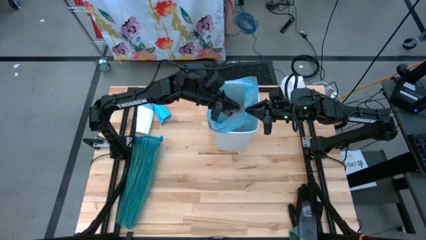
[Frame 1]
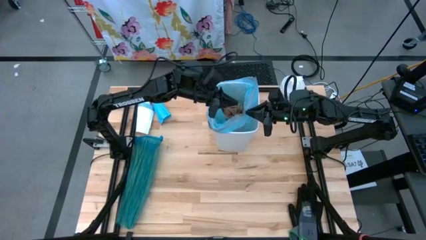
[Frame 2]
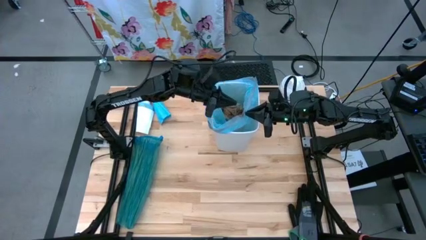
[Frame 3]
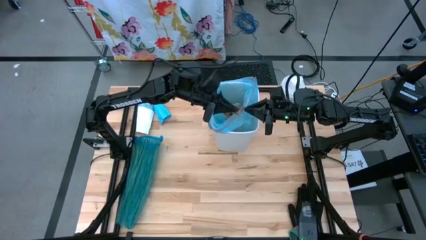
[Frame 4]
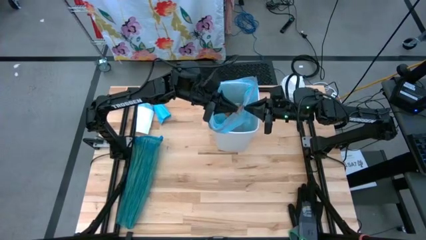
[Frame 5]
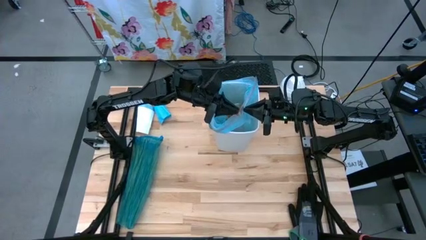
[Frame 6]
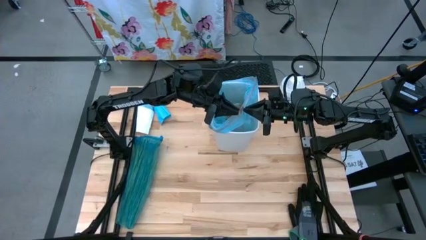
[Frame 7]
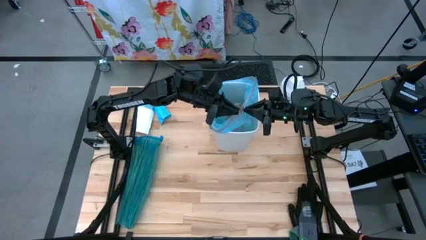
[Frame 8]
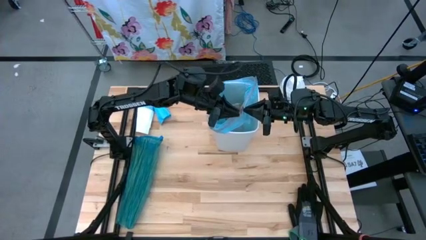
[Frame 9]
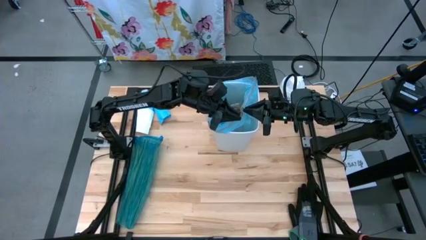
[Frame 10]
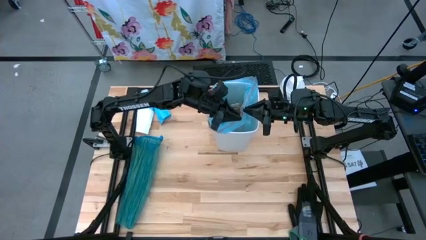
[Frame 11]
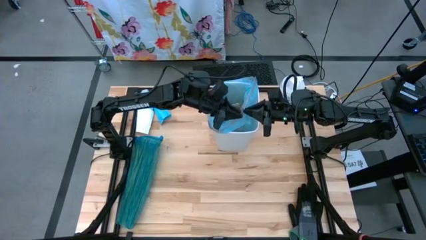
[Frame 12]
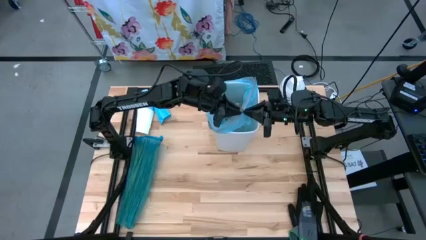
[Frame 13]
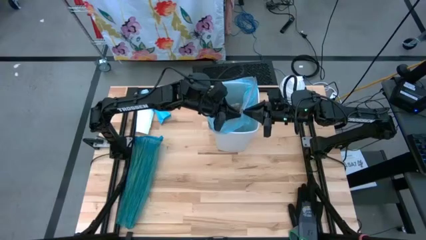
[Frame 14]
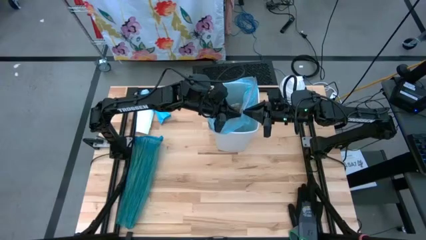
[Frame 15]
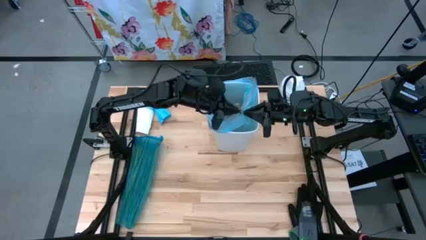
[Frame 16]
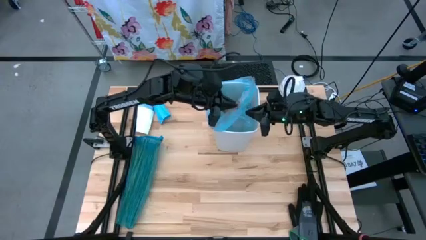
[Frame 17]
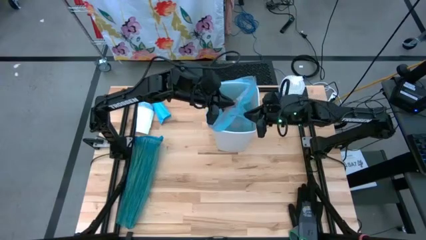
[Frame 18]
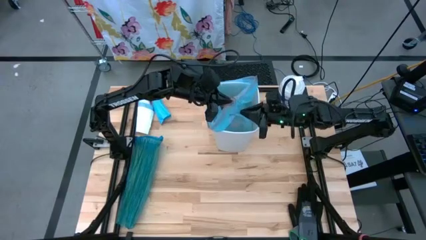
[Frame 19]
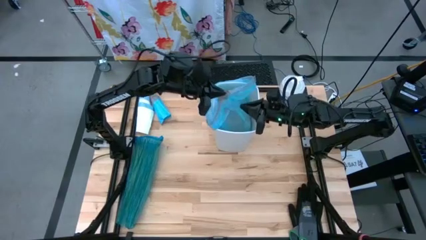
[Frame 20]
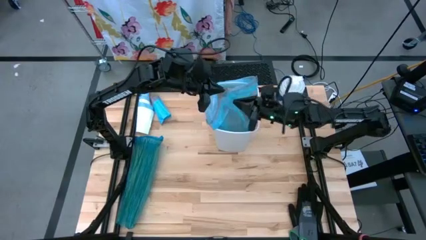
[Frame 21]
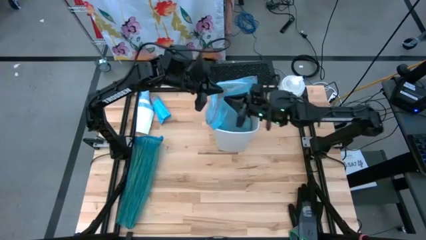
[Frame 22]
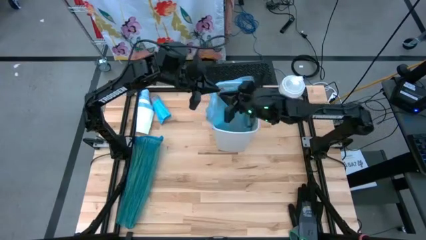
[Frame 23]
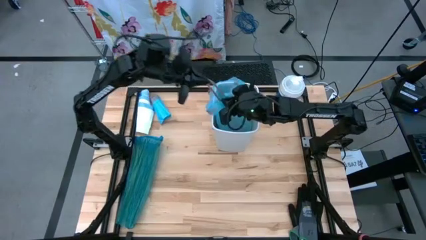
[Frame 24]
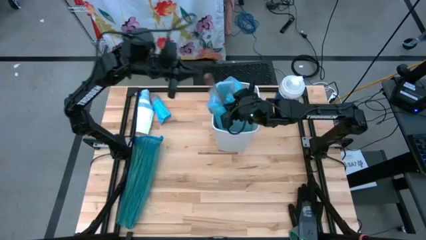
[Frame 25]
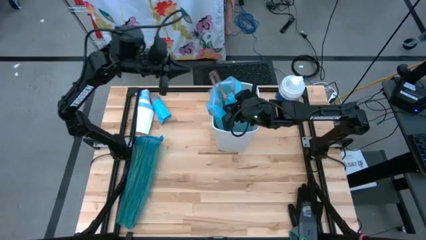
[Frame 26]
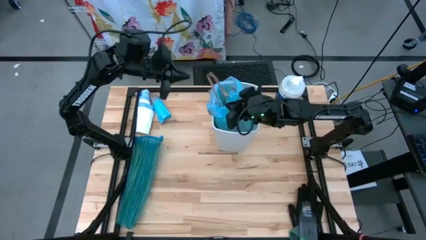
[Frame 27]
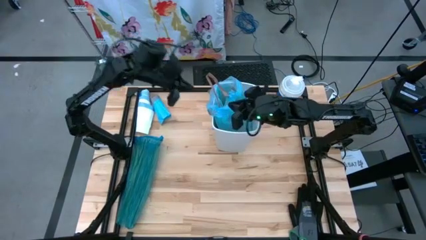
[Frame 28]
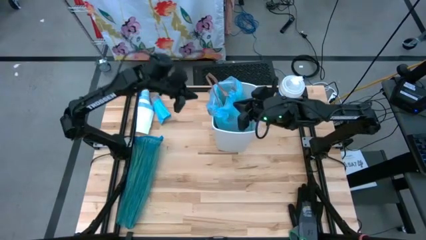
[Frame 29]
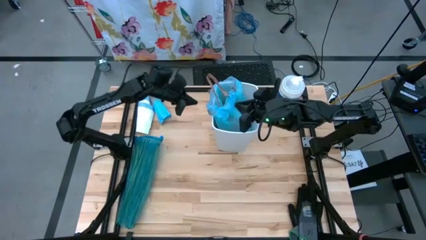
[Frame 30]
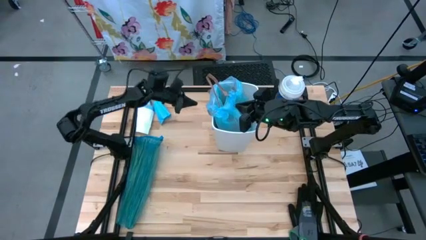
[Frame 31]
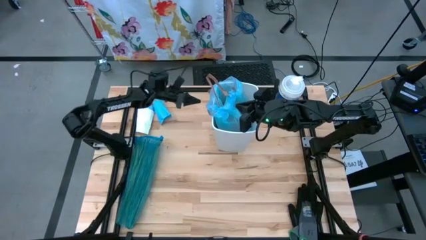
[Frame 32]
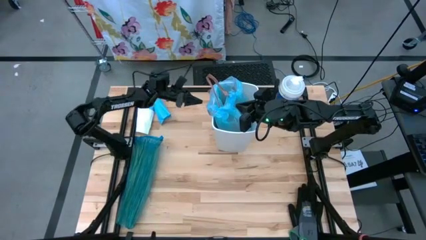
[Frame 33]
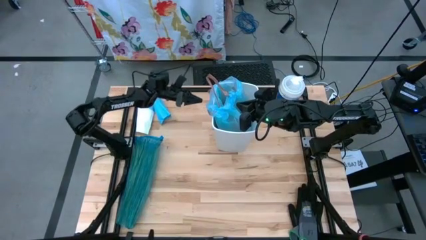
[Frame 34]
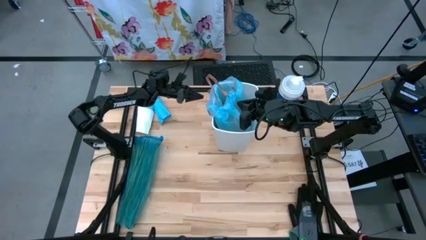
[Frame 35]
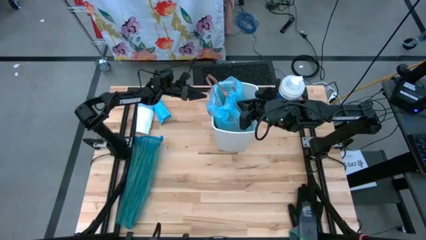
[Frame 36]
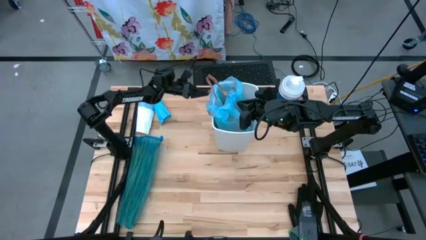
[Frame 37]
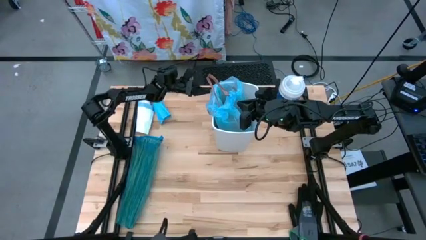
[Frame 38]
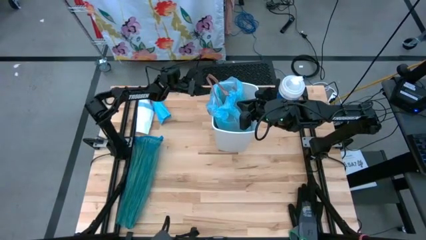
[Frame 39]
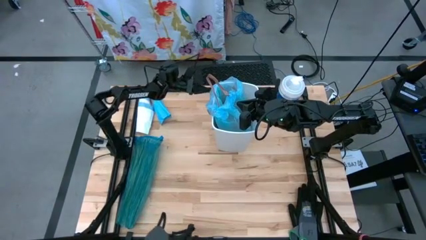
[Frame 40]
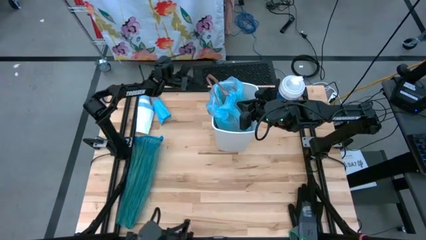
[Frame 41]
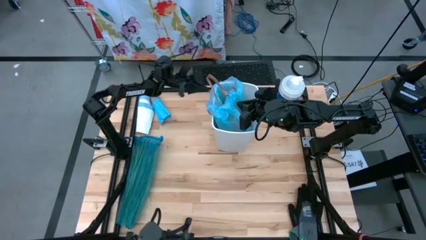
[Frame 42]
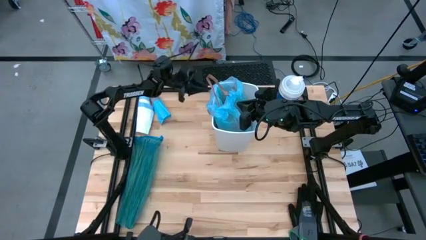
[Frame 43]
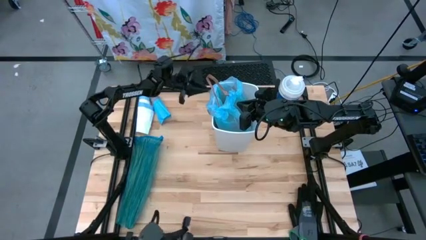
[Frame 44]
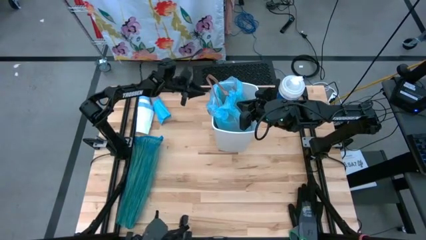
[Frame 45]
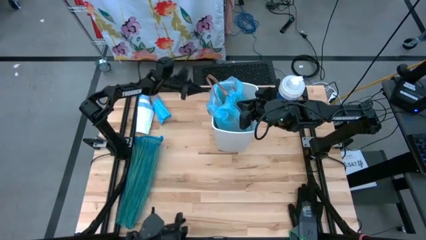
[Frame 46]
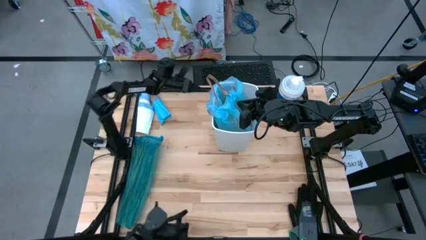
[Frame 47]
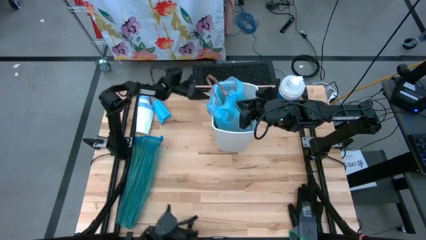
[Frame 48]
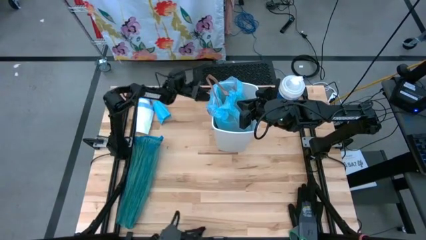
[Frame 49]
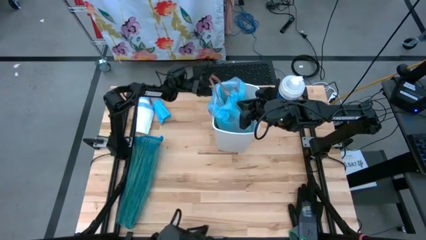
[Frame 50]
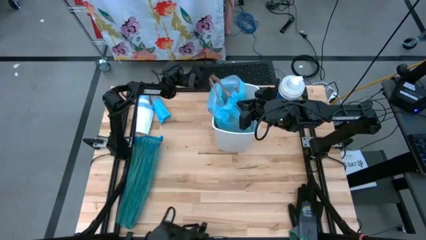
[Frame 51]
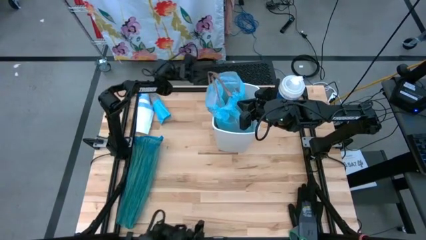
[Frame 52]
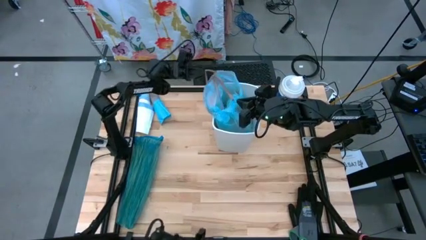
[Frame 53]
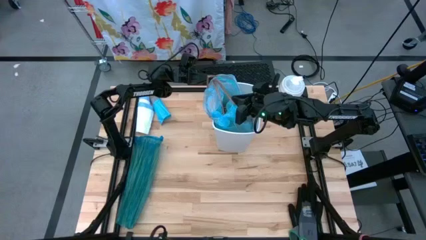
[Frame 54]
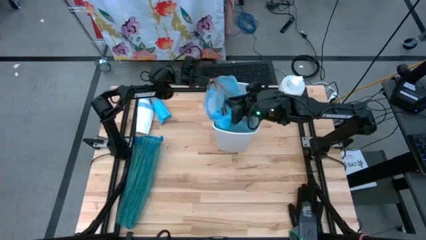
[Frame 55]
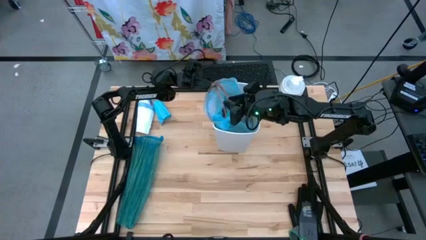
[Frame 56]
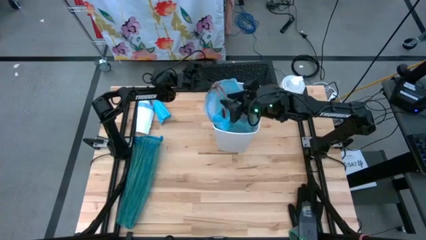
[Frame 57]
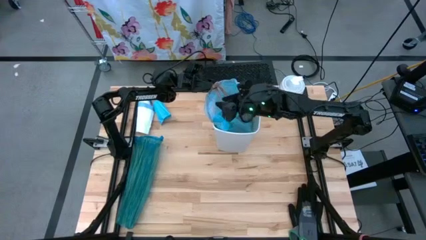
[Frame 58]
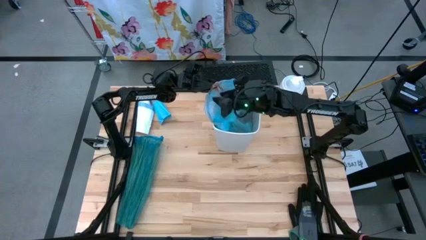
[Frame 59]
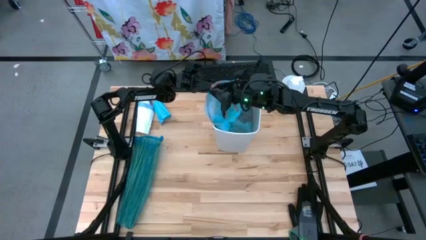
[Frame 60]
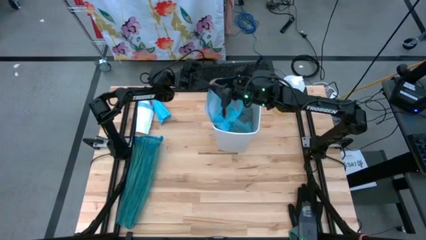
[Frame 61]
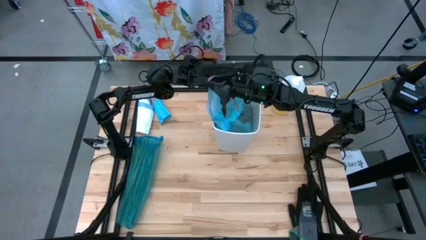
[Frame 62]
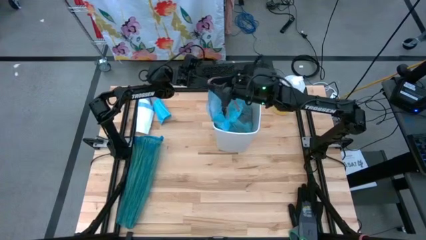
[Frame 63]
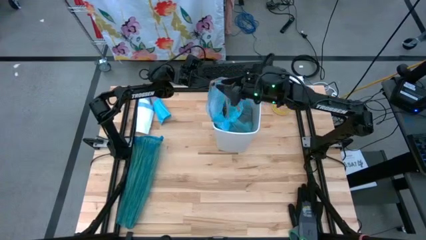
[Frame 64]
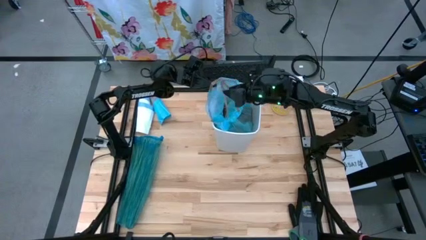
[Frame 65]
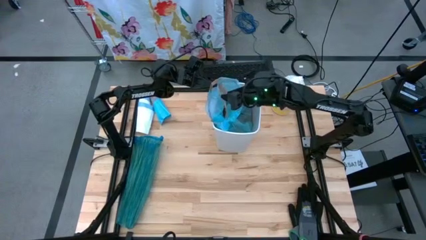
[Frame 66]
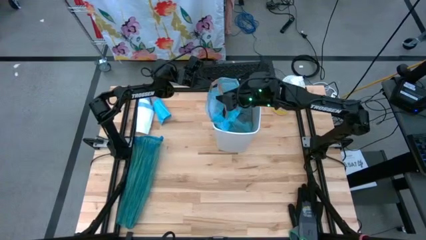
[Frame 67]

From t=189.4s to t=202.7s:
Task: place trash/remove bag and relplace
Remove the light blue trash bag from the white trash bin

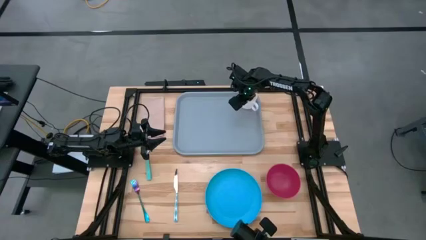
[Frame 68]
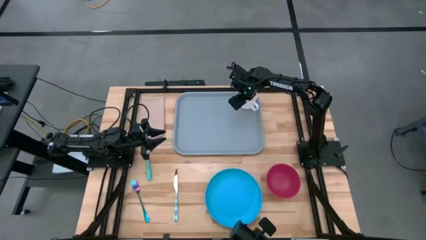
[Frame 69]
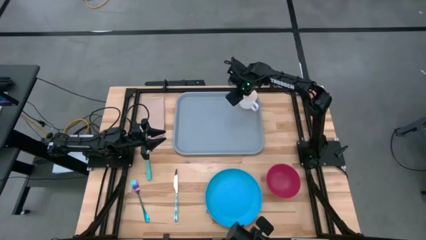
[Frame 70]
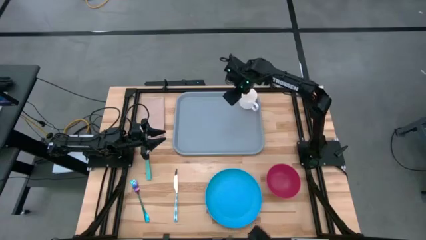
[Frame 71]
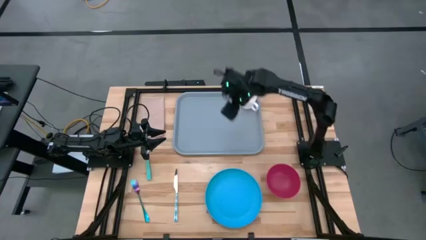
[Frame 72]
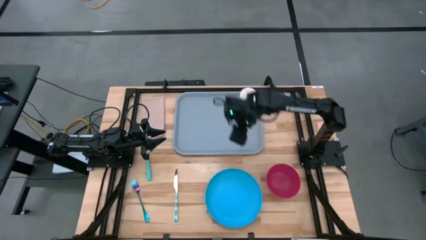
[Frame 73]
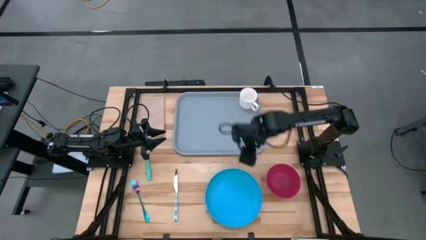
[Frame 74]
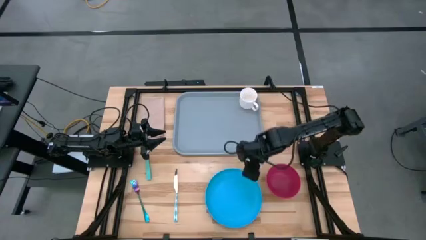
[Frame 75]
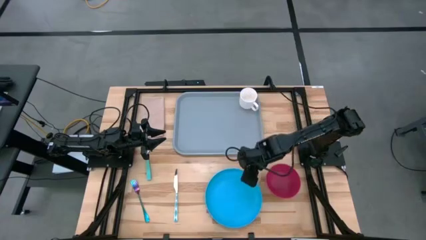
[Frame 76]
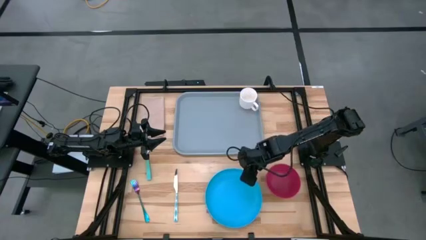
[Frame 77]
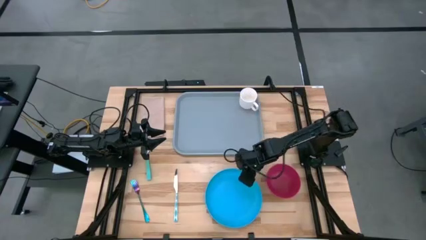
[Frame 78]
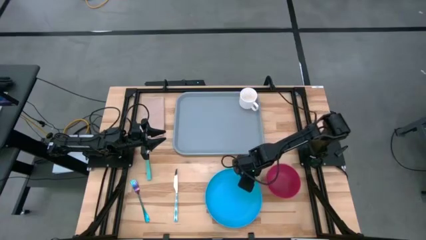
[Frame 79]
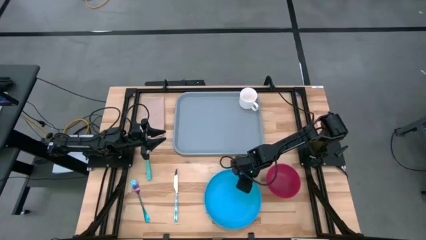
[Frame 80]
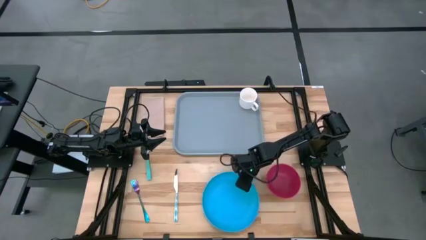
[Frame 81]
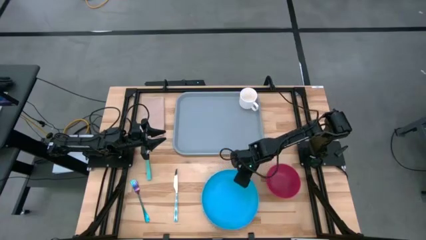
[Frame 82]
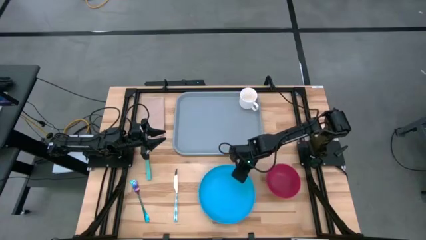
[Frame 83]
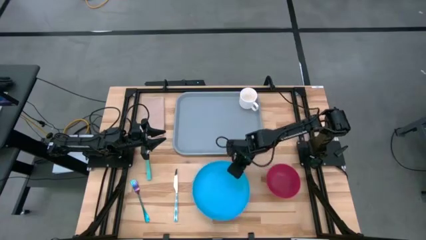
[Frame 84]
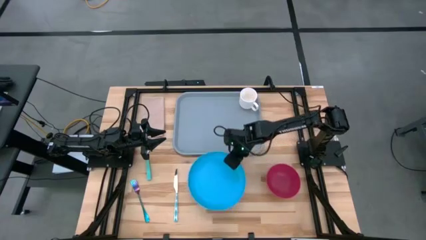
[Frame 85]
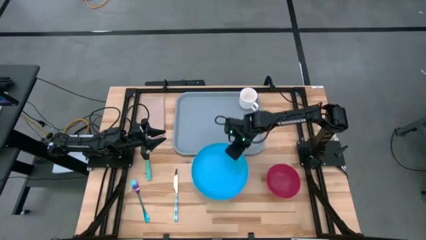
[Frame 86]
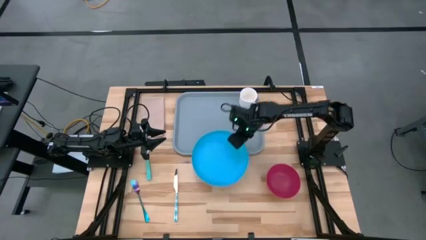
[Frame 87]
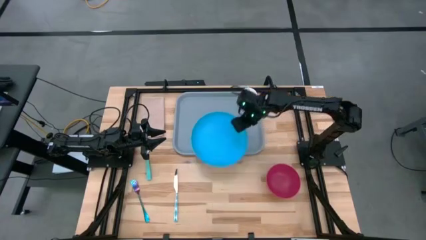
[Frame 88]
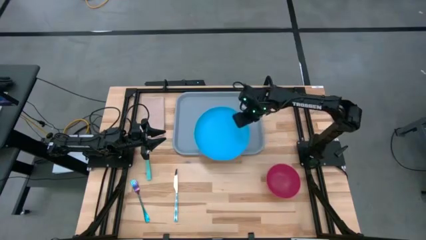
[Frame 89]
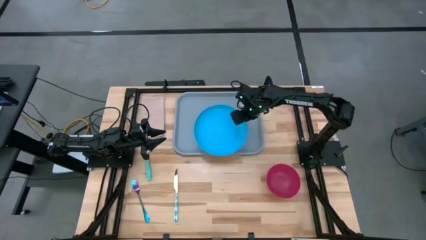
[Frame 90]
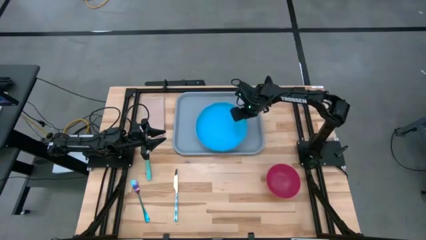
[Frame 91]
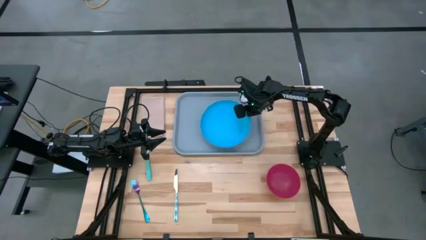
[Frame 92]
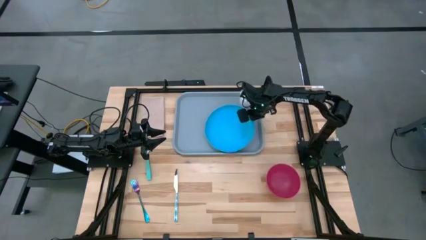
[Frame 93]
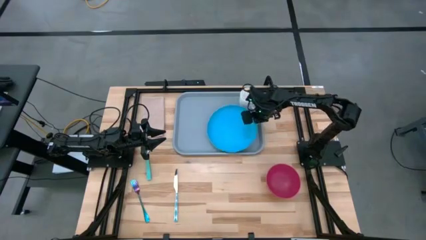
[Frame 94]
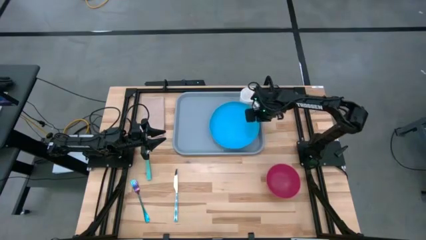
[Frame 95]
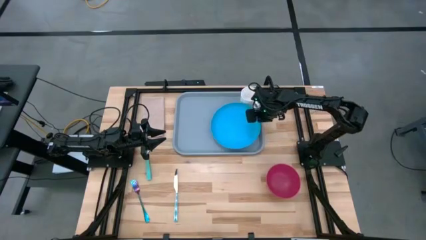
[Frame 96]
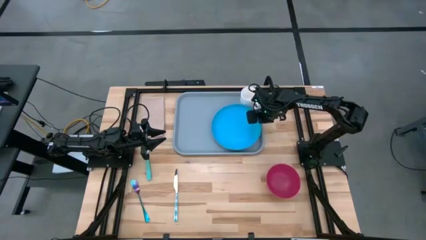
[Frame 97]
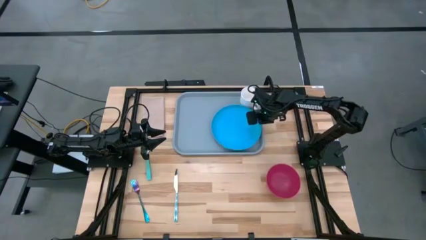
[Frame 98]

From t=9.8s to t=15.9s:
Task: Set up tray
Put the blue plate to the bottom left of the white mug on the gray serving tray
